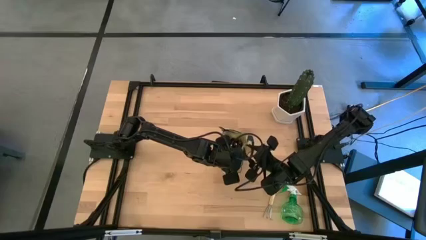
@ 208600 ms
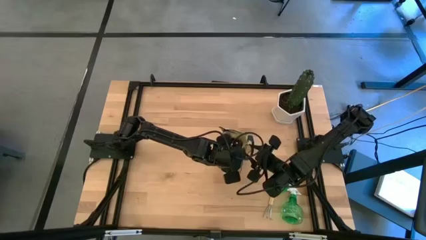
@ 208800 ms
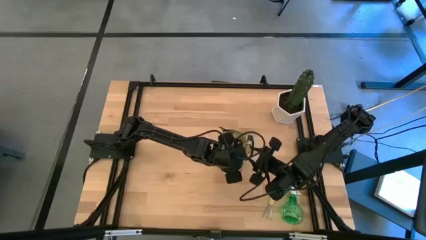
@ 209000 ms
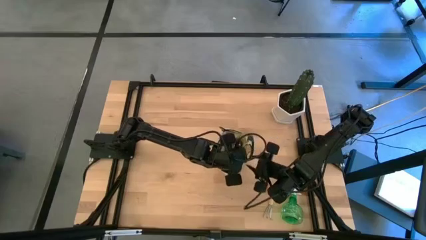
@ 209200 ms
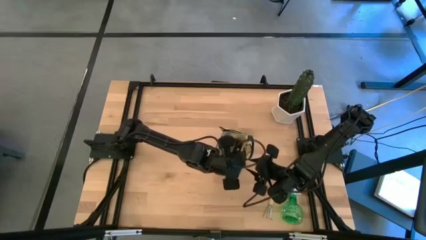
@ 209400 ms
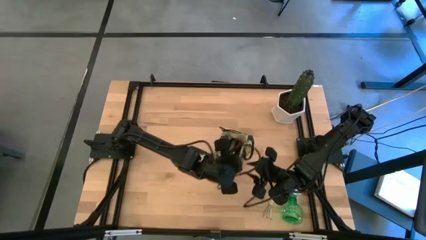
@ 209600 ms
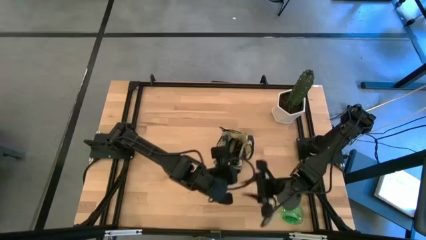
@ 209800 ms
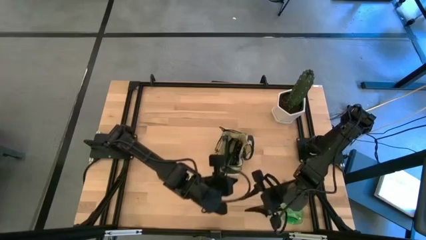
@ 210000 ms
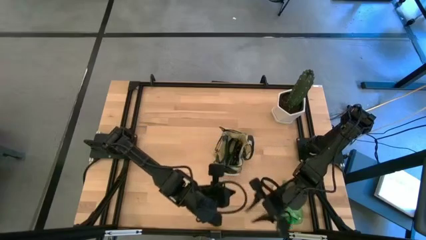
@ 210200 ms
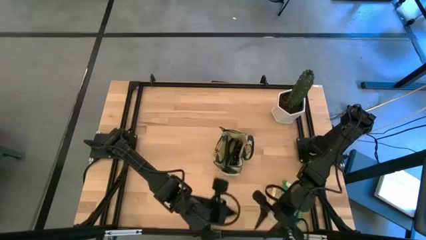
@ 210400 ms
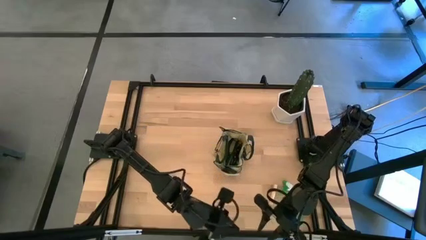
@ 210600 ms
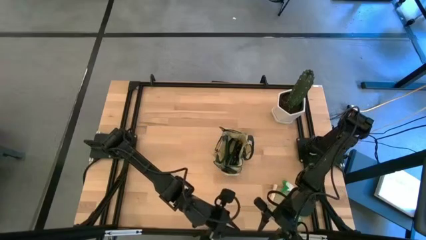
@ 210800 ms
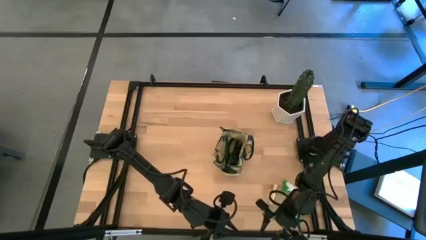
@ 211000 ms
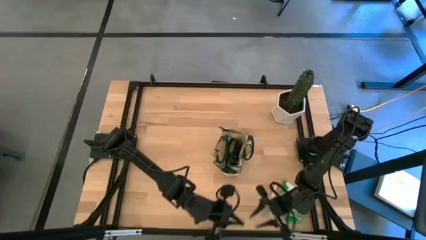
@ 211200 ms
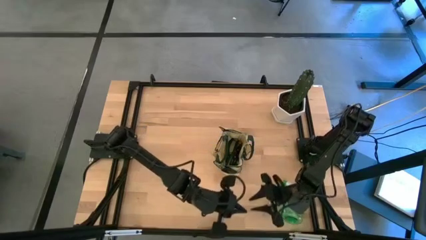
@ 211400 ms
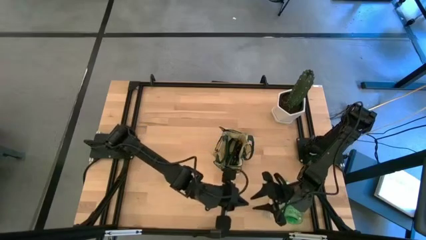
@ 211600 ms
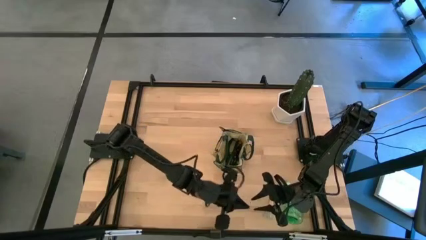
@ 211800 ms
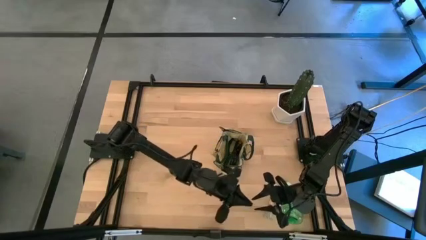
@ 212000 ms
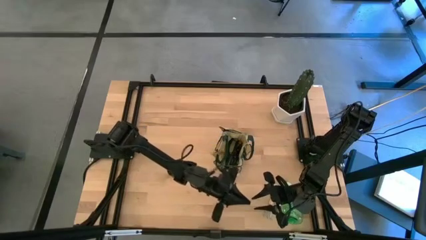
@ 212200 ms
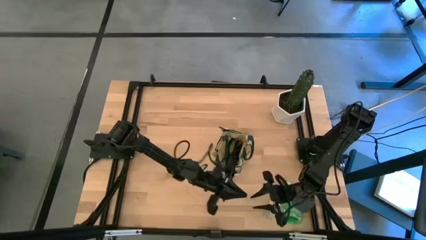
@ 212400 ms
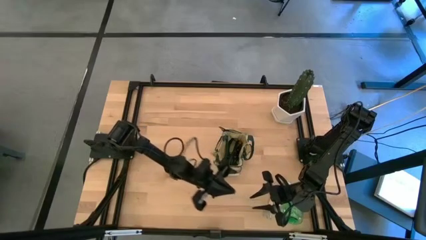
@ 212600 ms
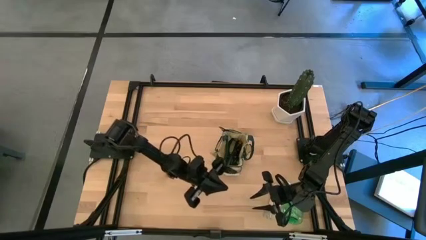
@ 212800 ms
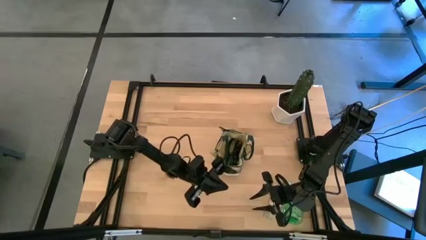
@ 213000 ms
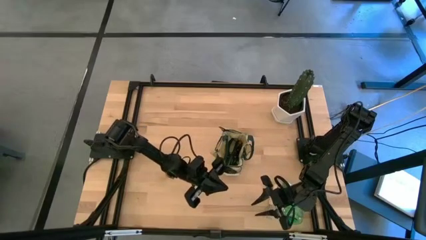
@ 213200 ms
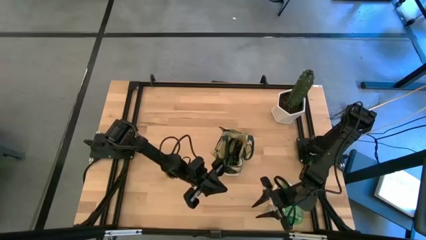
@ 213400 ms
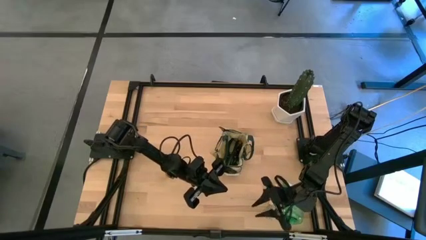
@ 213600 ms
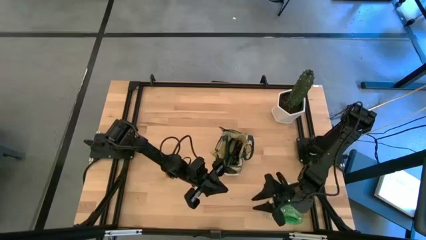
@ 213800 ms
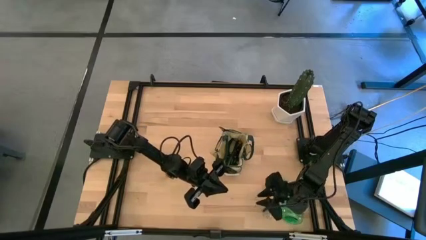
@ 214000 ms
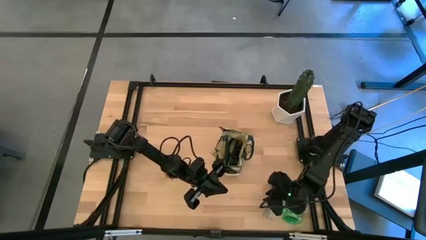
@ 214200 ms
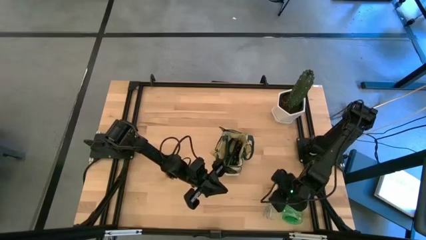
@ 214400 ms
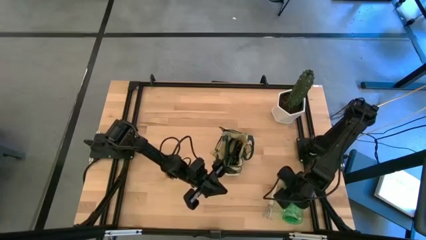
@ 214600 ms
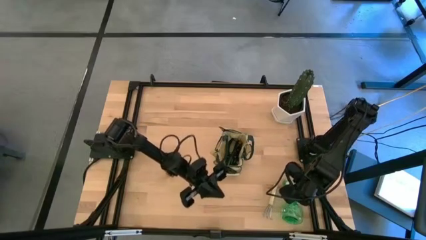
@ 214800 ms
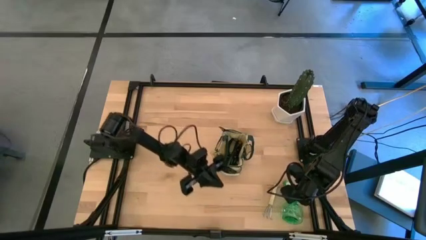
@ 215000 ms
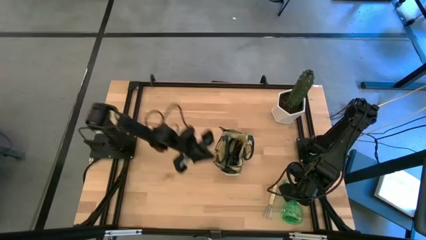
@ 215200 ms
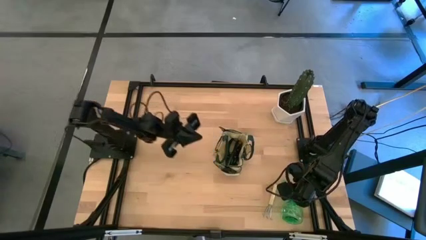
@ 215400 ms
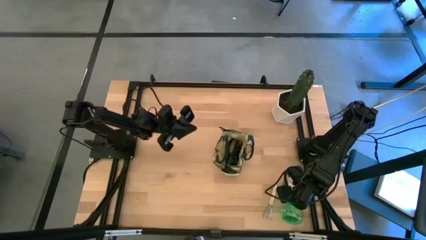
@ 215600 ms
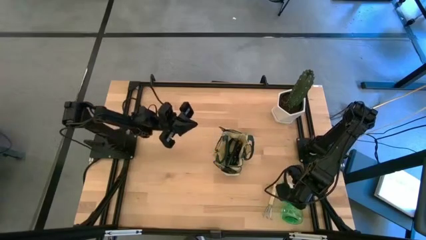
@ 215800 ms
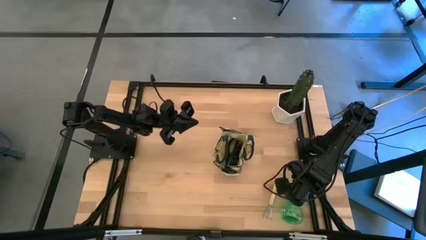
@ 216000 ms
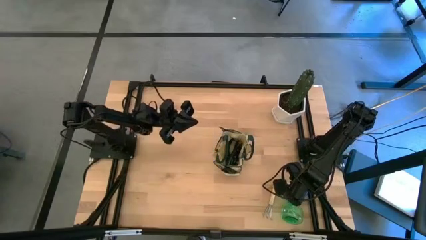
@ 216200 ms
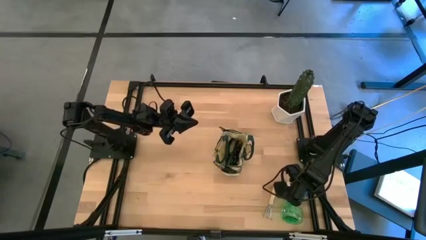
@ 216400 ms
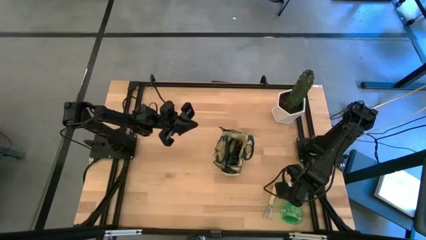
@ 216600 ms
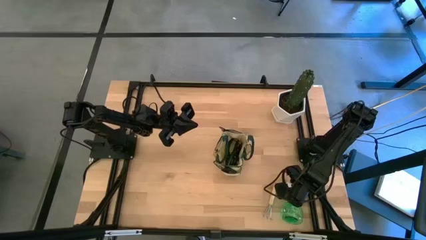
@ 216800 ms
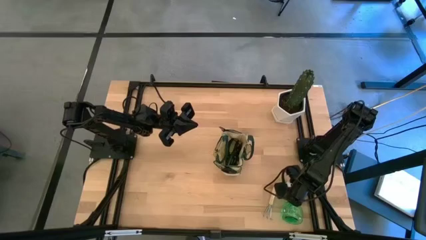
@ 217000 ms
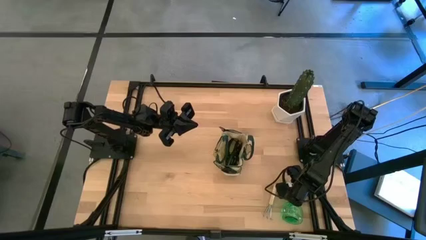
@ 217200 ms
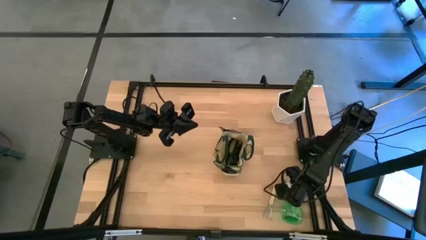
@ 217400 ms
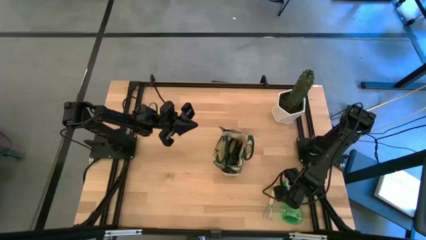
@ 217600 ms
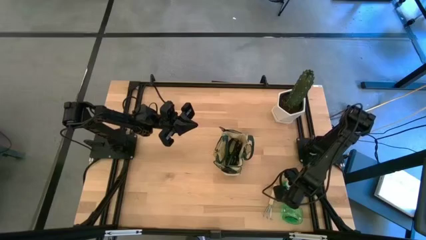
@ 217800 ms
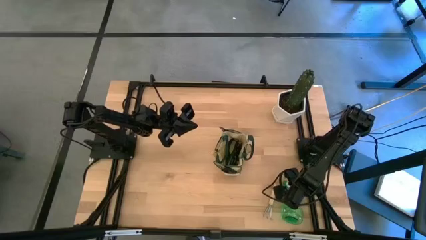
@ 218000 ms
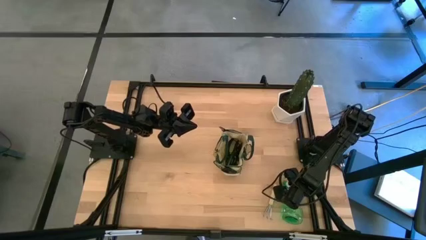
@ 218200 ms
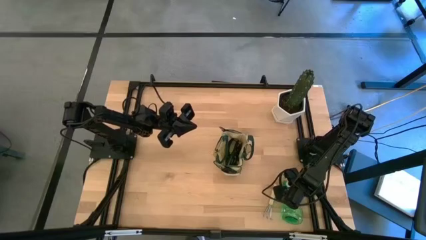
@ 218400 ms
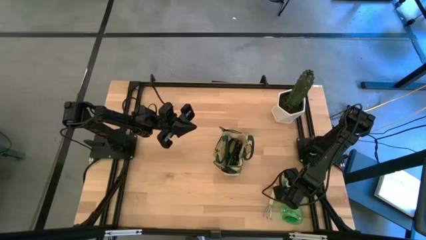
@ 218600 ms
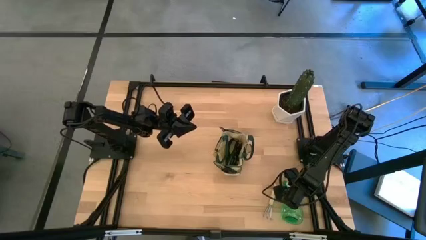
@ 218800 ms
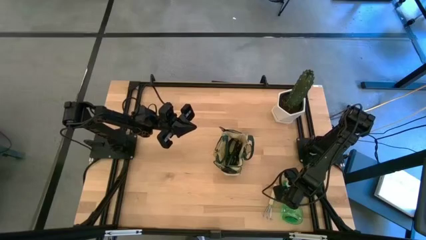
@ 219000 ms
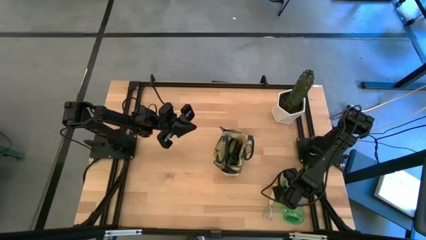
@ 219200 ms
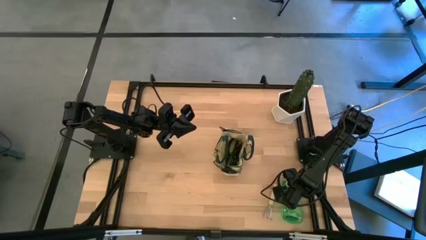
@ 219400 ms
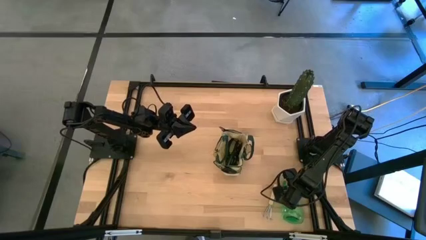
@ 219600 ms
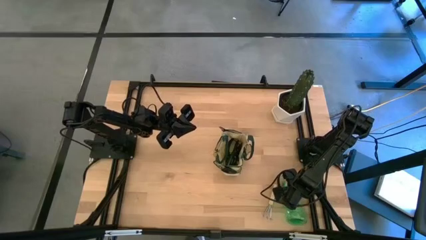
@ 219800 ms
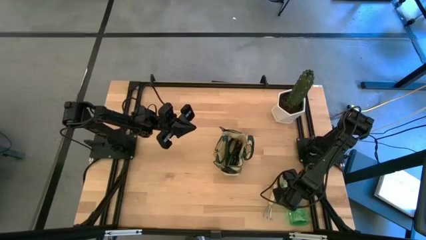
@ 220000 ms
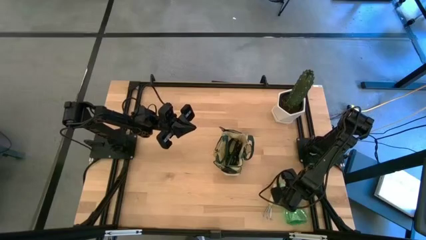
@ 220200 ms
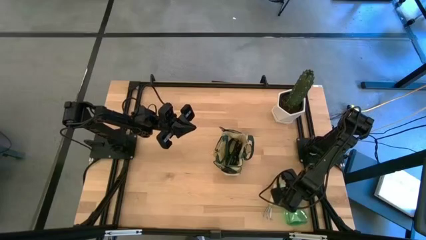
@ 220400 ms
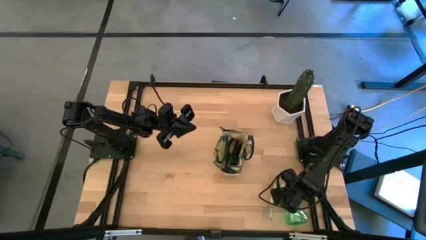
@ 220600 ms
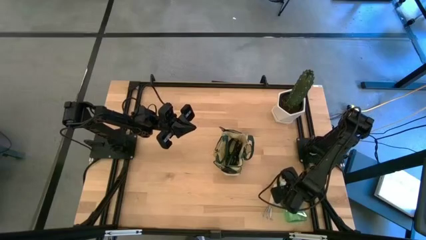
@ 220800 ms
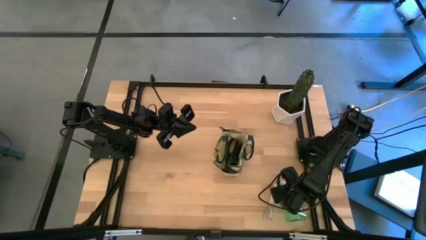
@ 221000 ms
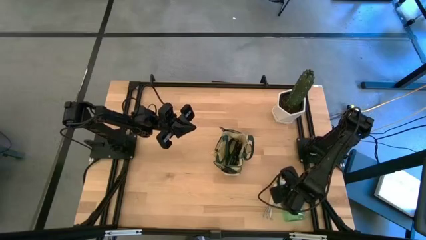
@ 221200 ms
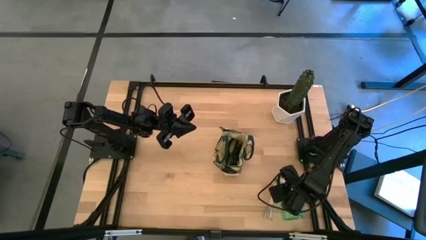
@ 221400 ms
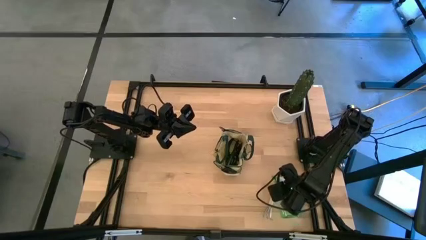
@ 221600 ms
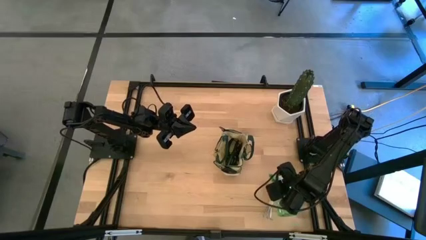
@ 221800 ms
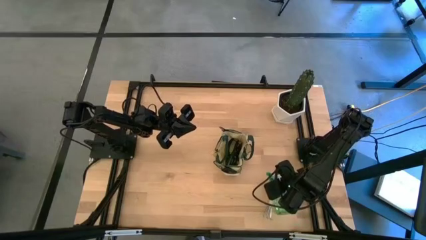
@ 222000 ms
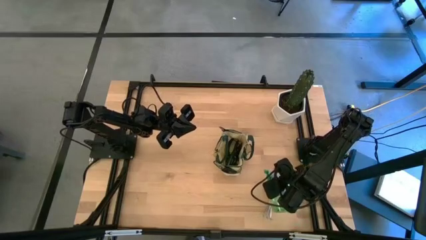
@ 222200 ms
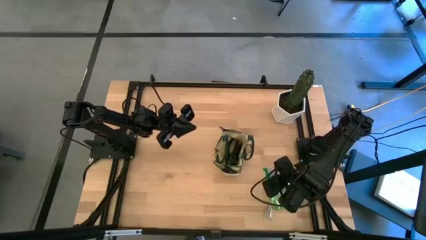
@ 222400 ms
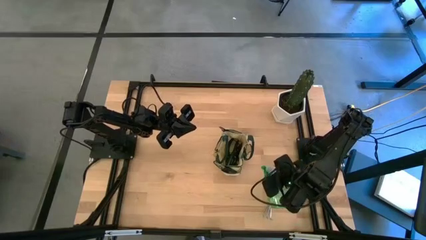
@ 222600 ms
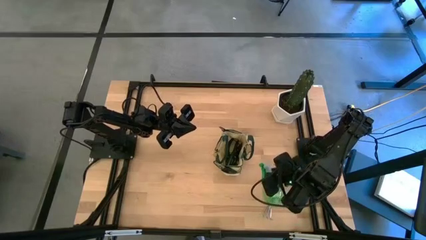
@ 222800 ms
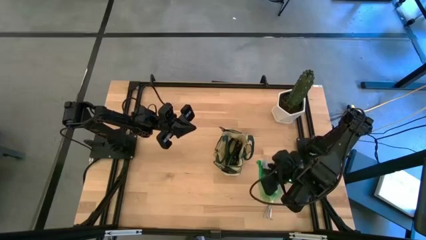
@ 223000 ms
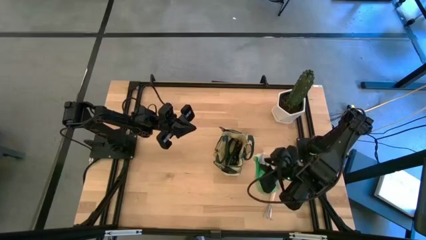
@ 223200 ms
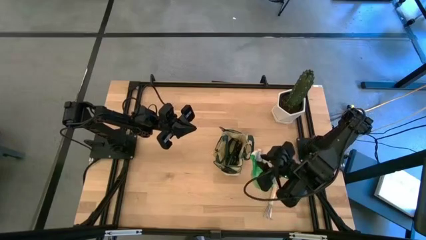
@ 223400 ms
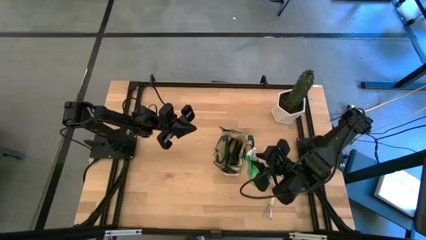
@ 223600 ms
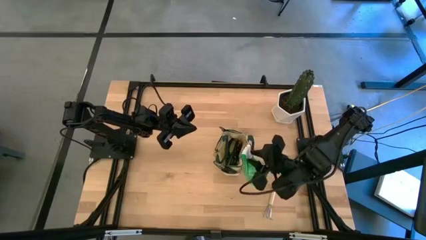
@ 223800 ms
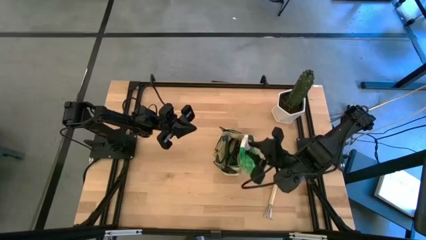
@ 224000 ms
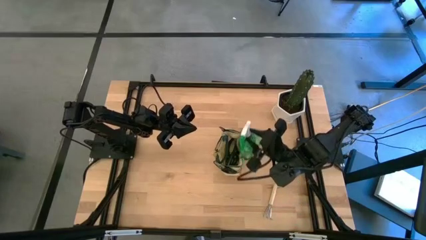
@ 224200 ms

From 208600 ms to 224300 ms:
Task: Pick & Place Garden tools in Gardening bag
Put the green spray bottle into the green gardening bag
